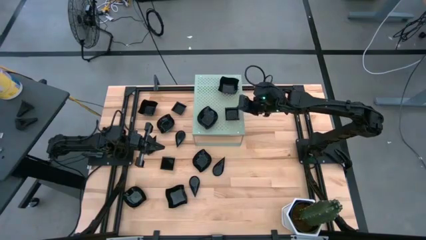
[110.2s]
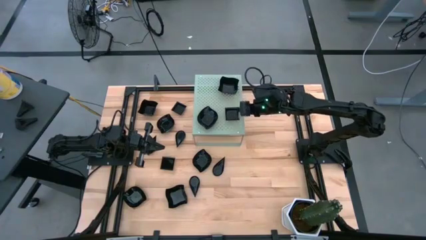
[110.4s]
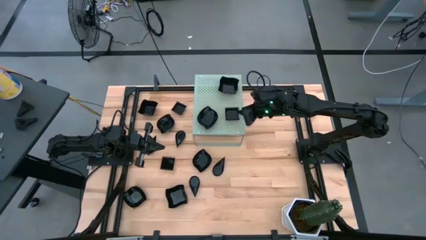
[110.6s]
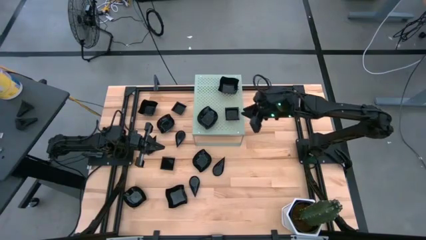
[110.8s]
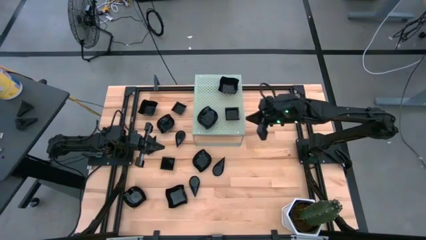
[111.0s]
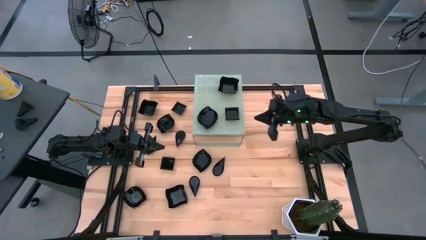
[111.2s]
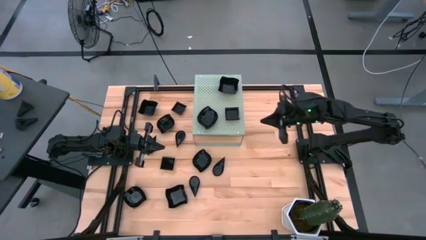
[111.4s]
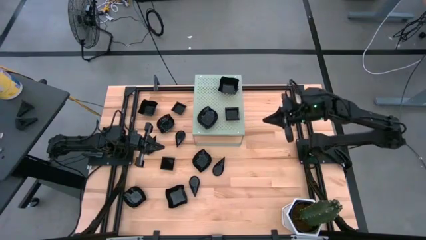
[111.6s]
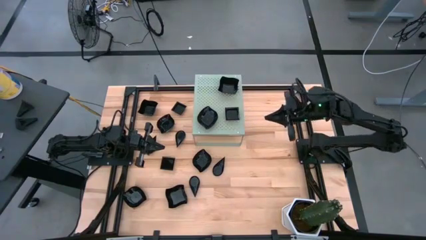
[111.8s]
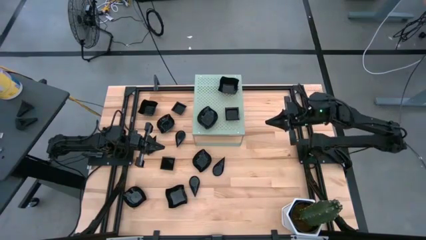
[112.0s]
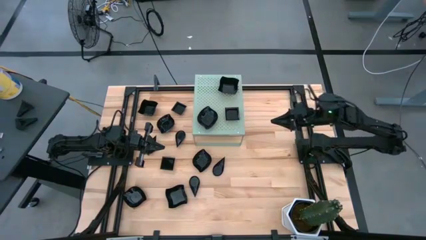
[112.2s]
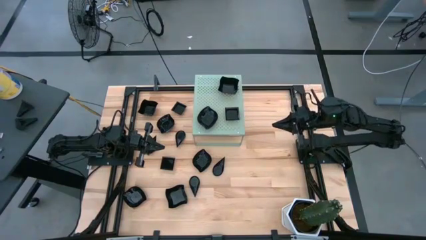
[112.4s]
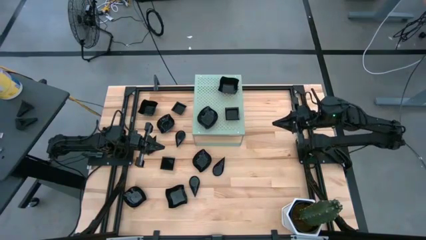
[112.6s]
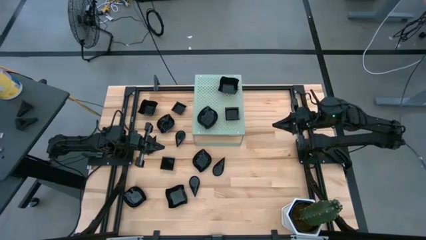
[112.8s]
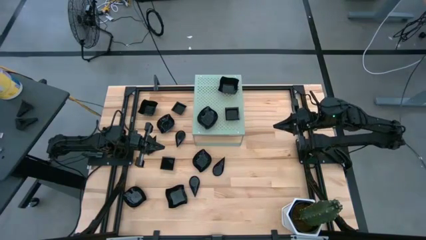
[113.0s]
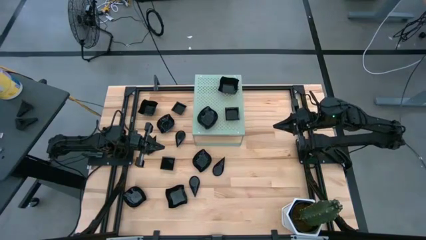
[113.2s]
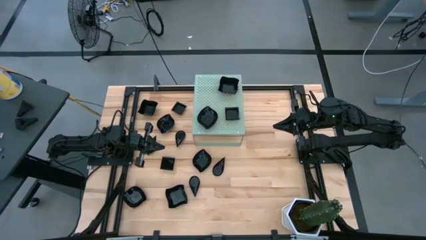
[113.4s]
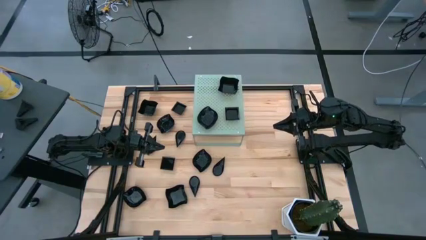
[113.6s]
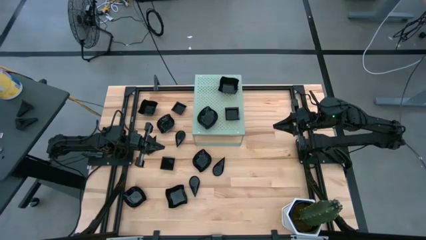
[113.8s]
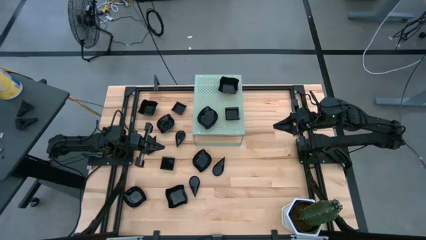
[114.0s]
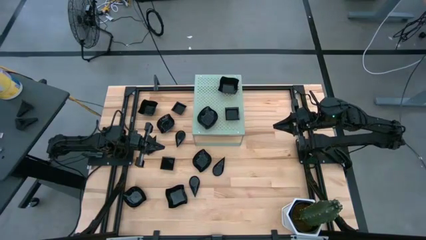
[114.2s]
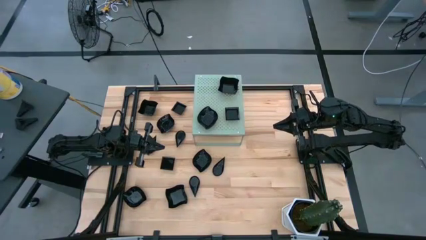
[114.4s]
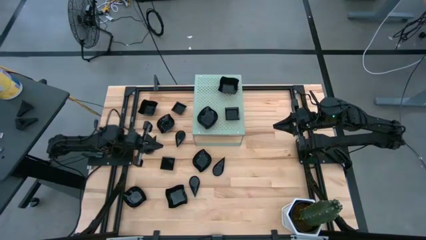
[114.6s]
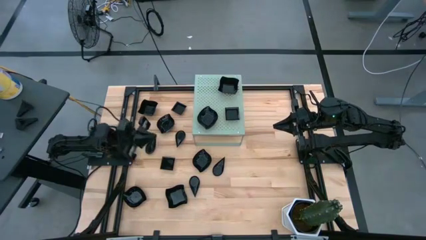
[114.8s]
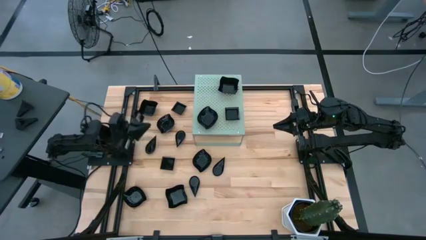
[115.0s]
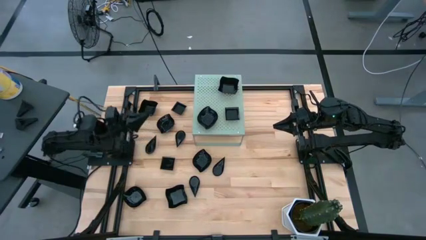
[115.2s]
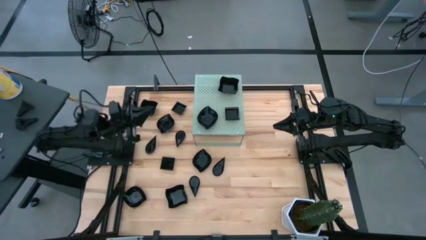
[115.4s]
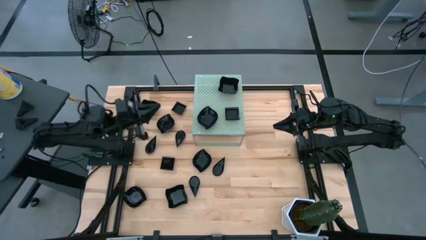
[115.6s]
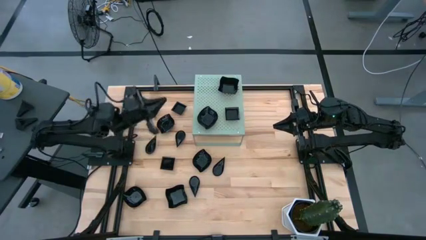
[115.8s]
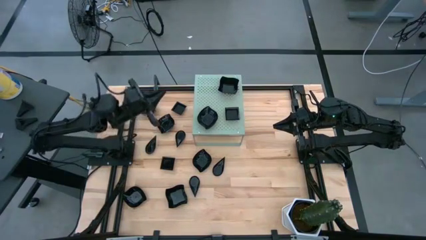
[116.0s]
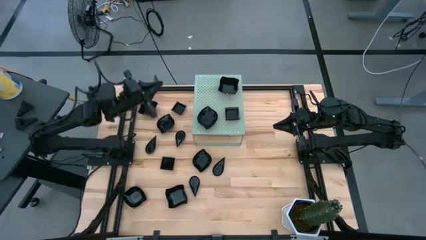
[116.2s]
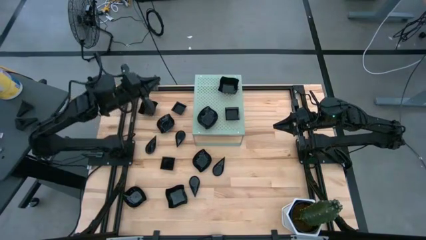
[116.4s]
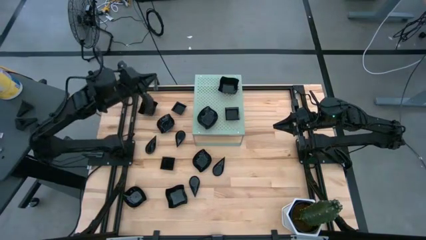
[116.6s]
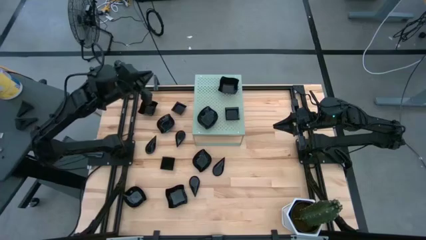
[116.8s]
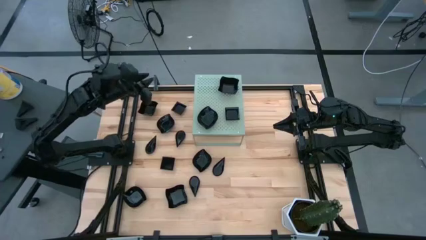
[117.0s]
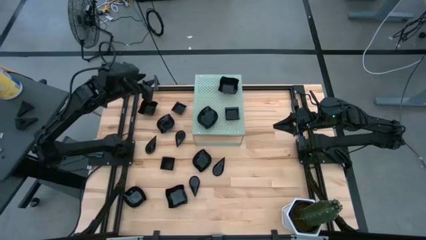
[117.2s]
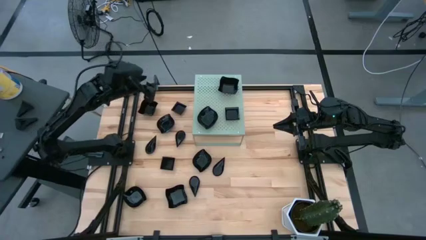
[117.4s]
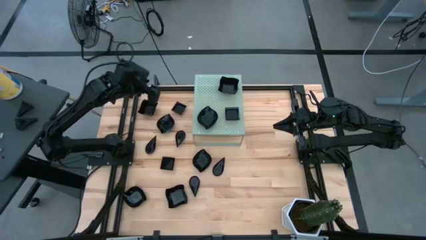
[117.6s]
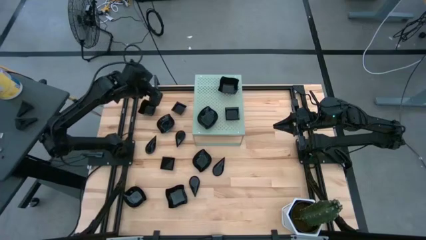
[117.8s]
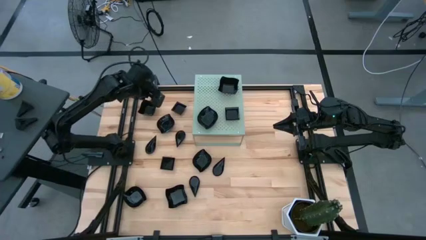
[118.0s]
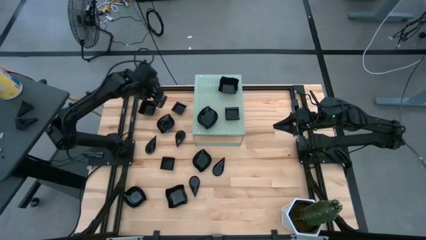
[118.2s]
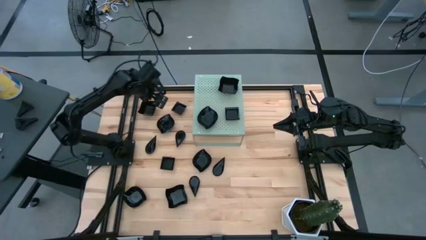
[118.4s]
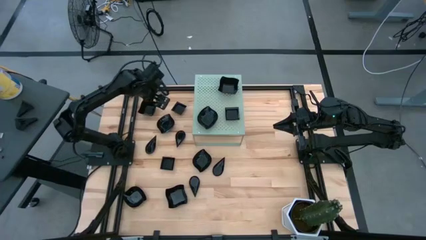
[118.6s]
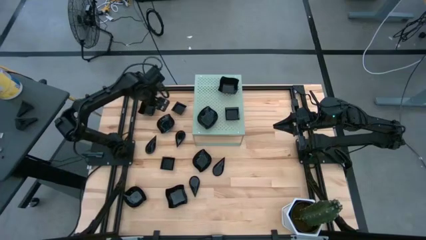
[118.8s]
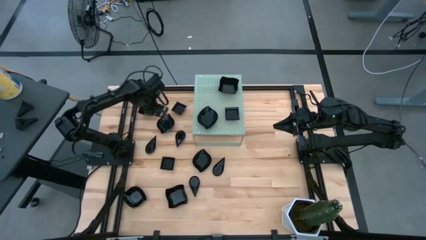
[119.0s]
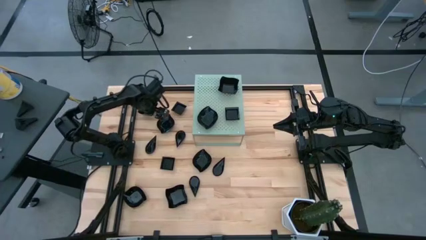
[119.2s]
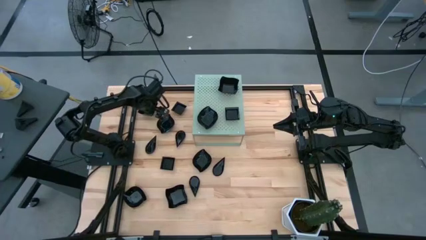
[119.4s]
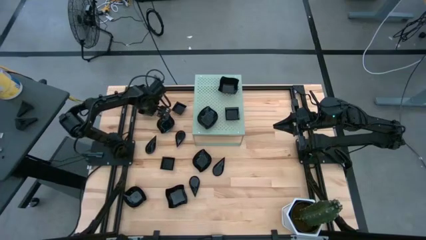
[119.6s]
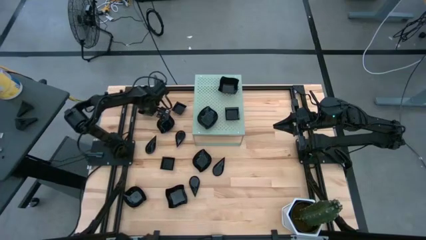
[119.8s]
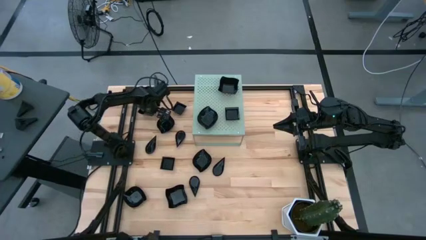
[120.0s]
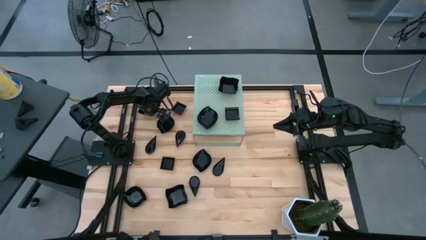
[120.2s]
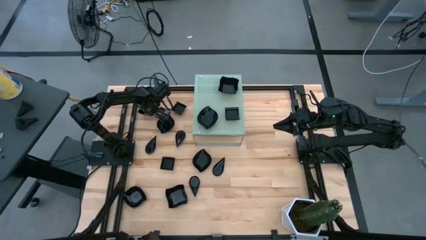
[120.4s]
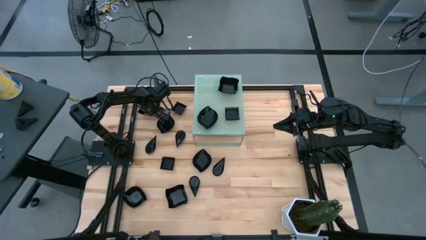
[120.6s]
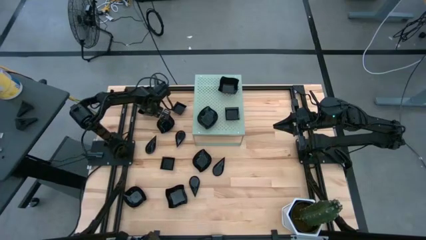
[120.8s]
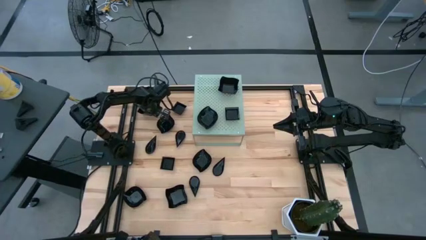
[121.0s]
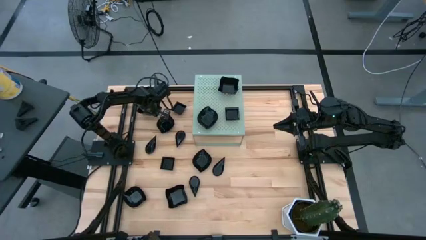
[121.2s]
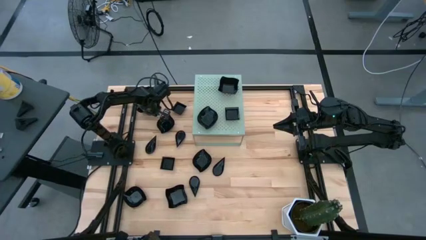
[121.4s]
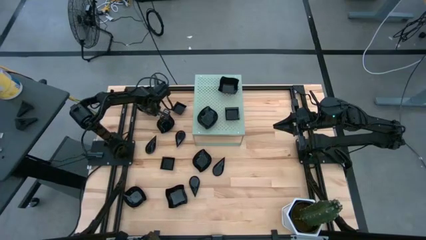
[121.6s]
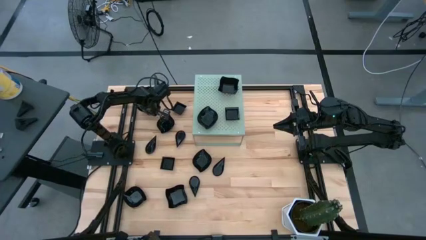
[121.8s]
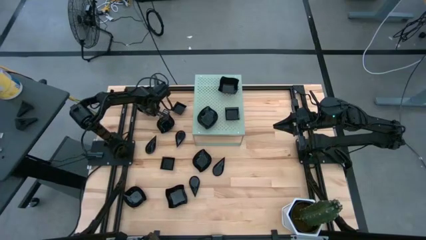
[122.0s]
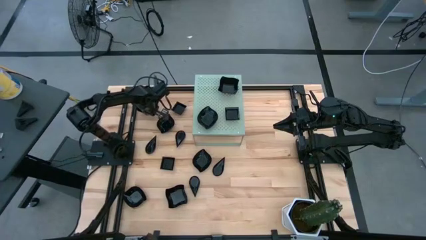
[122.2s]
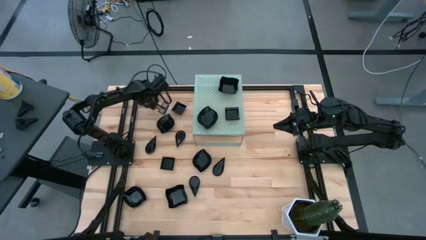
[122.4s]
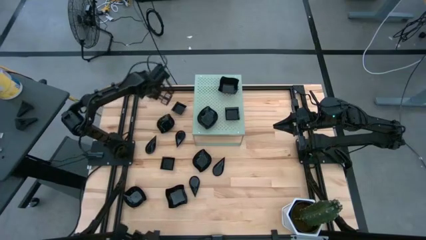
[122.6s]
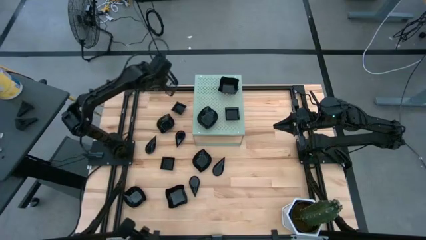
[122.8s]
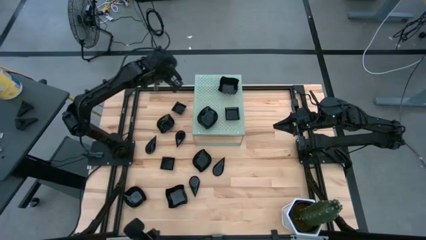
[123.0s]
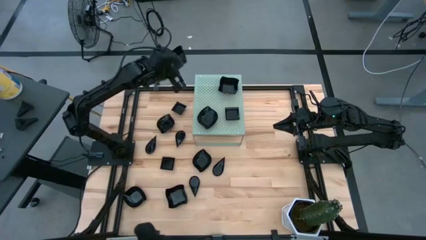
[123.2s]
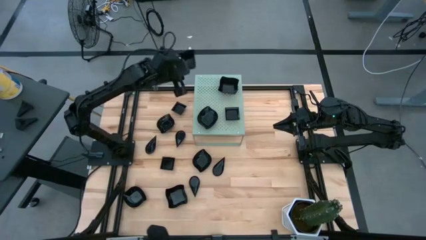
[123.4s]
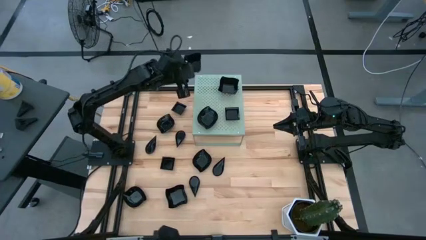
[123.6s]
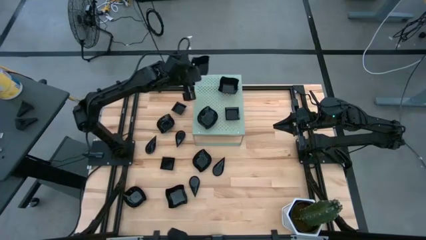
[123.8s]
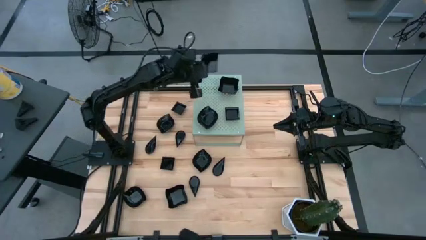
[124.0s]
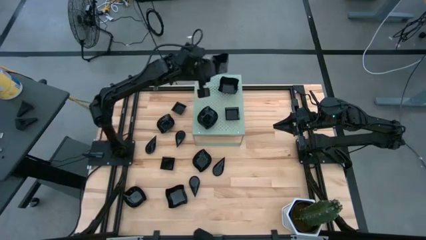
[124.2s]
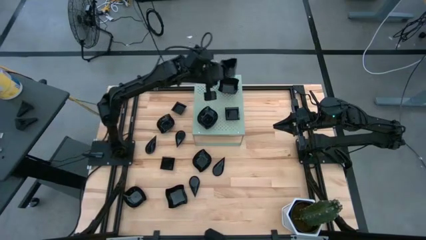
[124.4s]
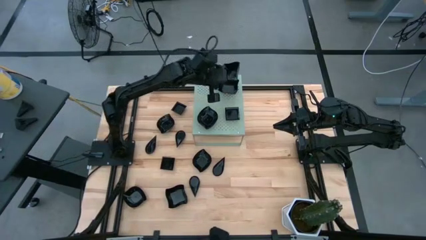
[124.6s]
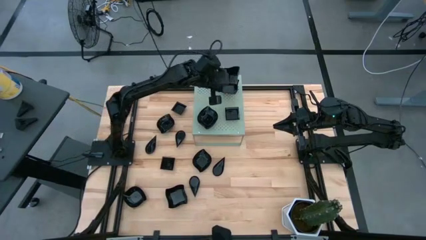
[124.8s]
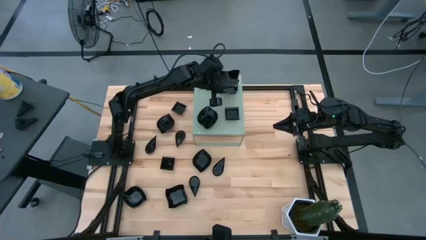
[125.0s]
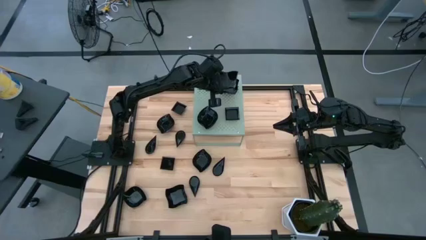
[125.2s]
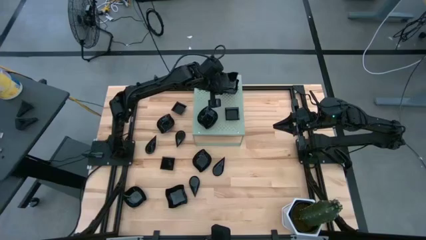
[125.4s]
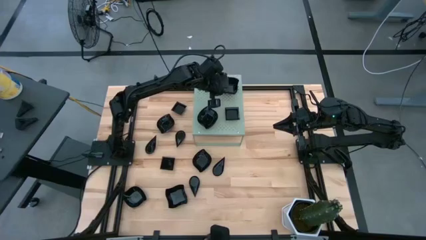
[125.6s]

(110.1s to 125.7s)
Task: Pick & Place Mini shaped plates
Stack the distorted square plate on top of the distorted square plates on the shelf

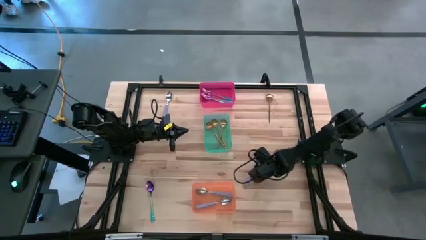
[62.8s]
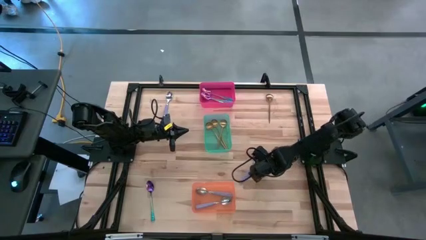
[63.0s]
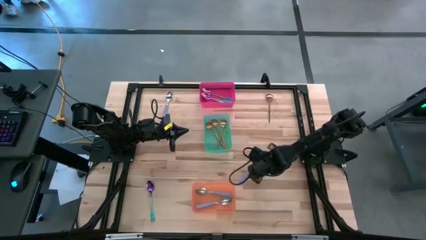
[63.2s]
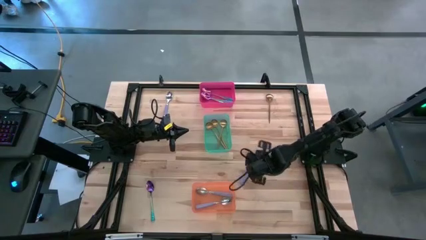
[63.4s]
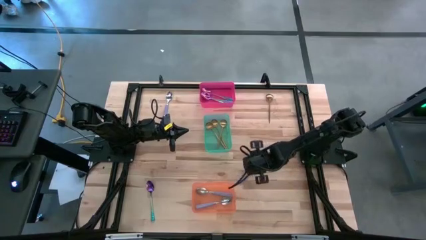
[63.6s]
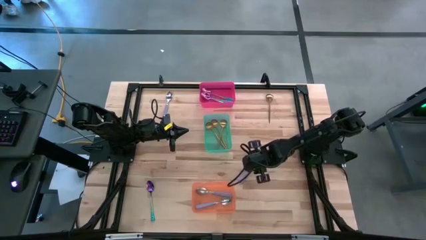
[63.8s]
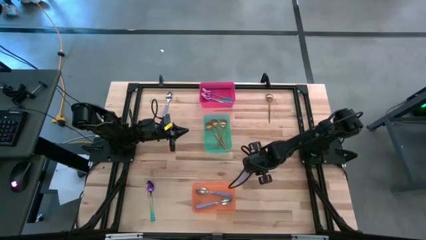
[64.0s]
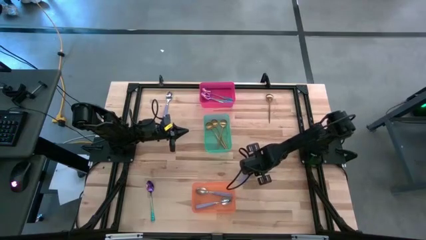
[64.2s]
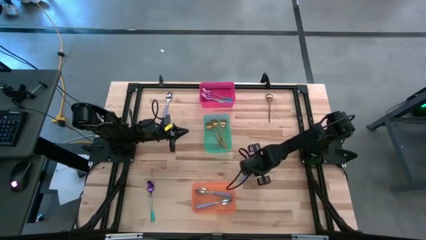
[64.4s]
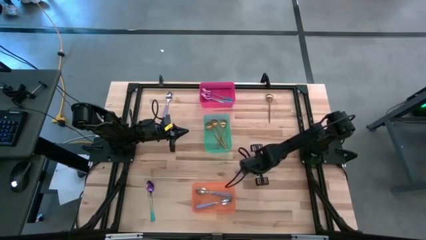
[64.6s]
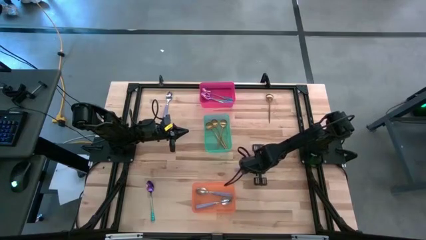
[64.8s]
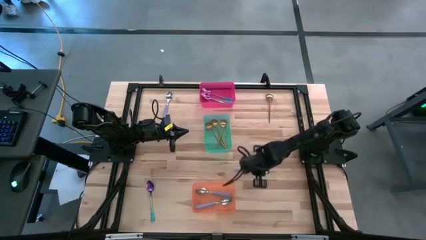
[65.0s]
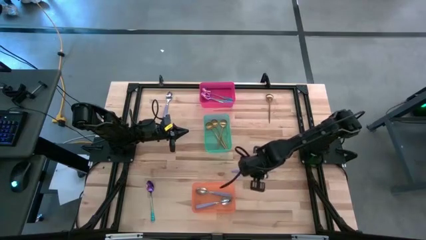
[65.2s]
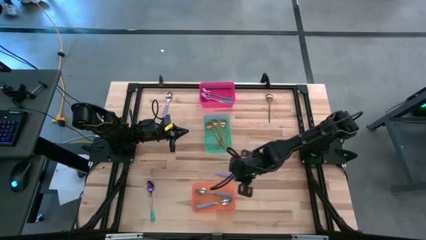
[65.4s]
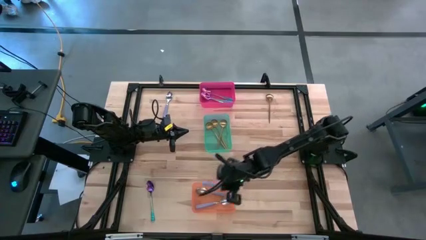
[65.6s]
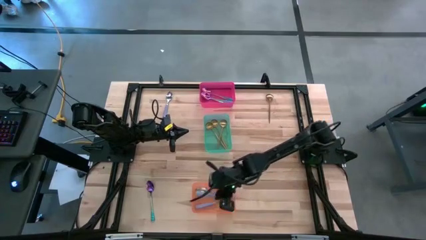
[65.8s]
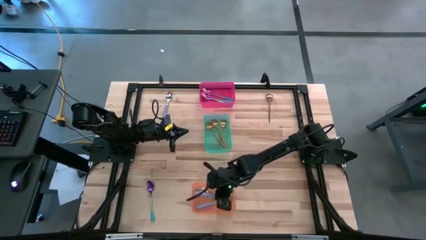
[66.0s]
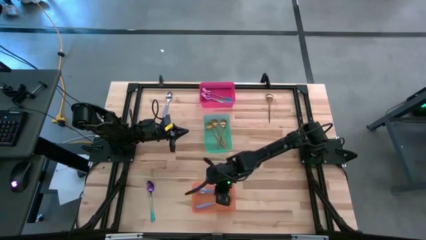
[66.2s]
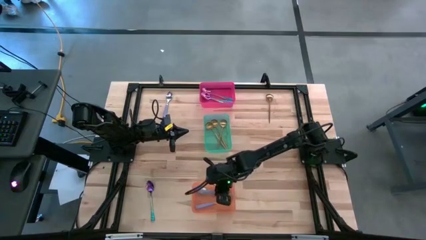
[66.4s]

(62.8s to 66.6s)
Task: Sort silverware by color (type)
Put the purple spoon into the orange bin
